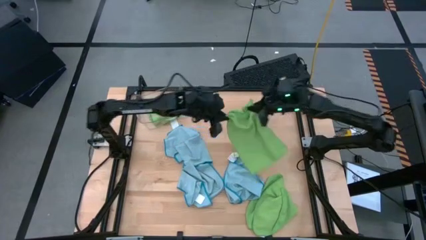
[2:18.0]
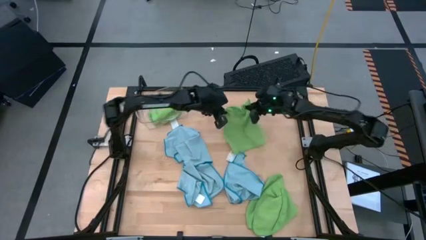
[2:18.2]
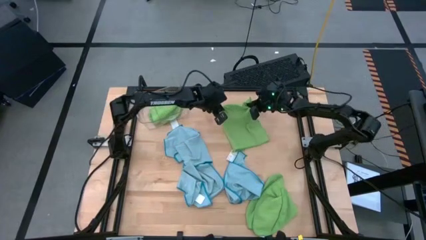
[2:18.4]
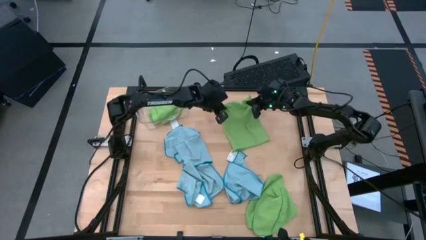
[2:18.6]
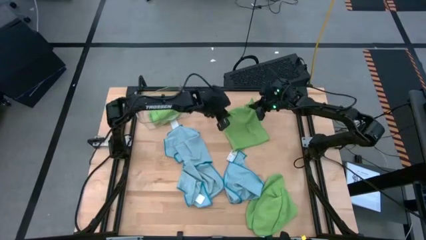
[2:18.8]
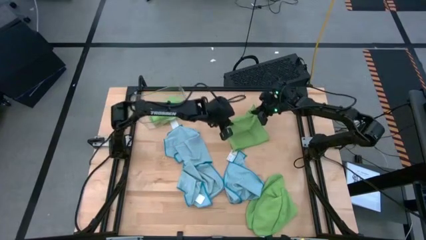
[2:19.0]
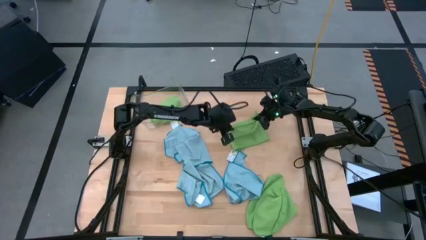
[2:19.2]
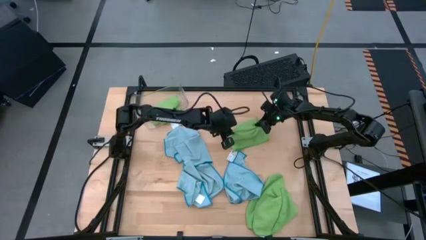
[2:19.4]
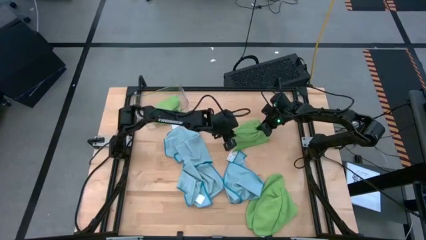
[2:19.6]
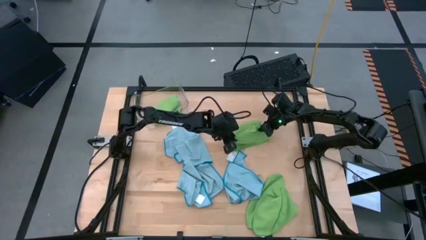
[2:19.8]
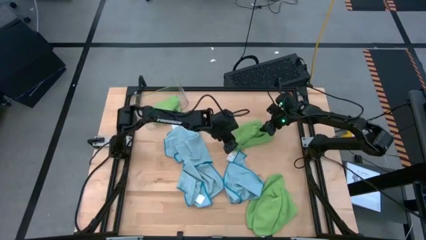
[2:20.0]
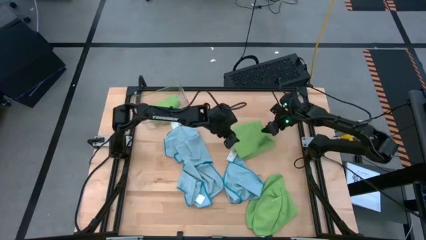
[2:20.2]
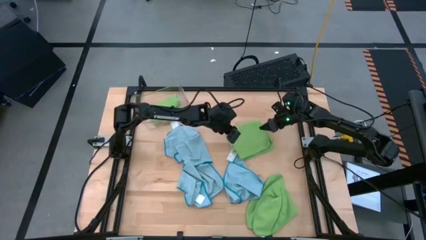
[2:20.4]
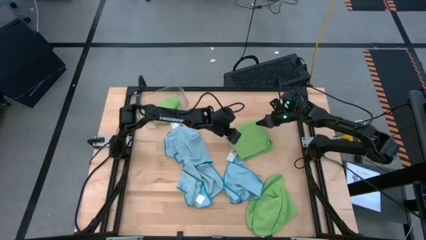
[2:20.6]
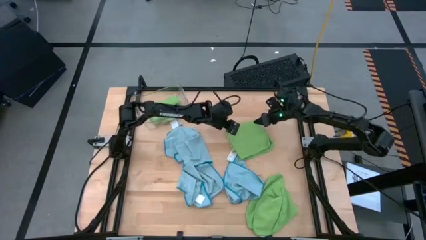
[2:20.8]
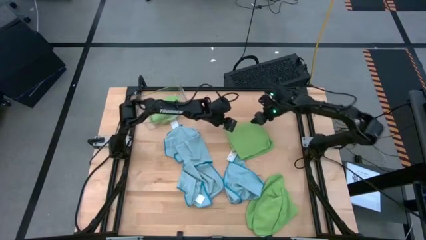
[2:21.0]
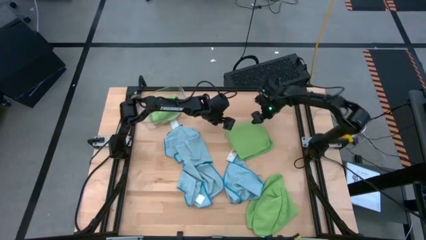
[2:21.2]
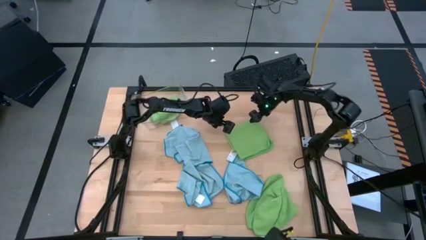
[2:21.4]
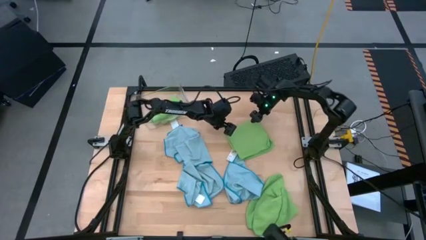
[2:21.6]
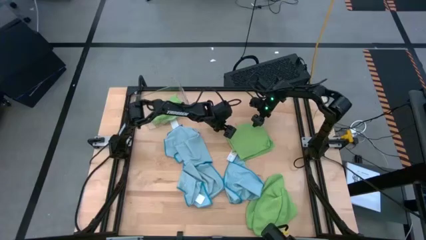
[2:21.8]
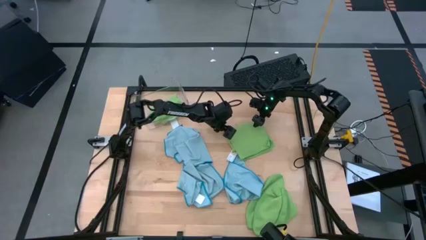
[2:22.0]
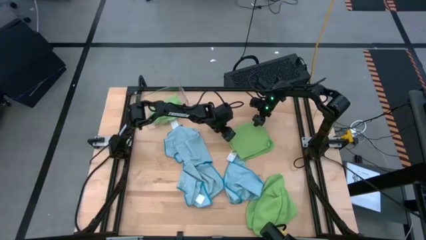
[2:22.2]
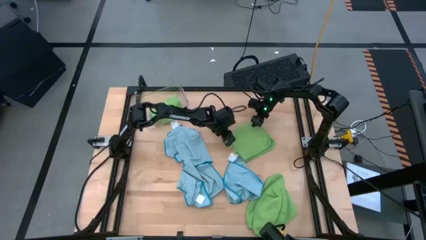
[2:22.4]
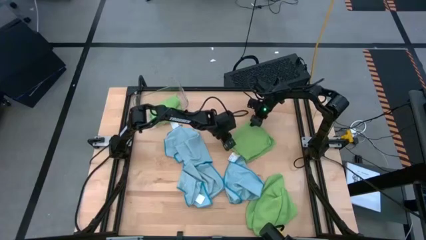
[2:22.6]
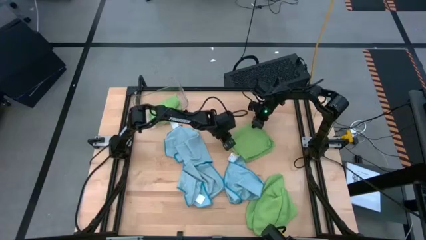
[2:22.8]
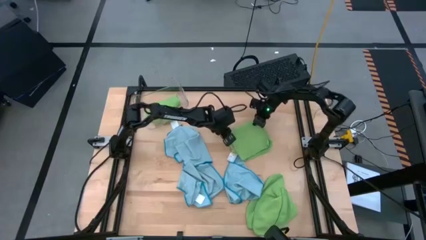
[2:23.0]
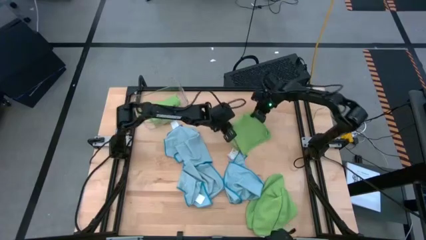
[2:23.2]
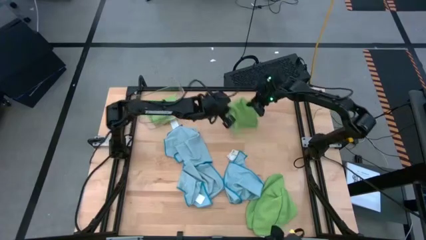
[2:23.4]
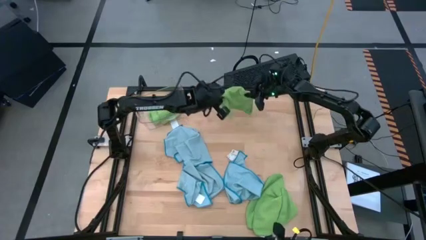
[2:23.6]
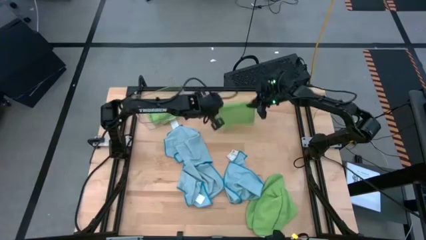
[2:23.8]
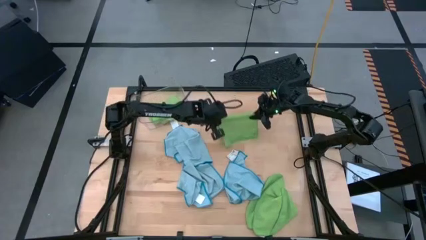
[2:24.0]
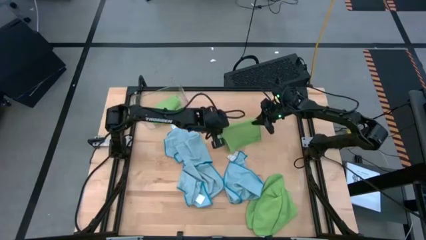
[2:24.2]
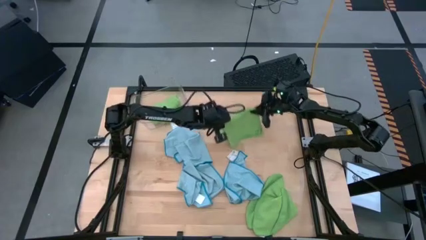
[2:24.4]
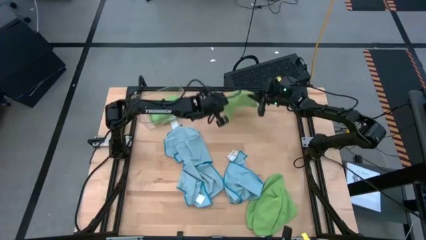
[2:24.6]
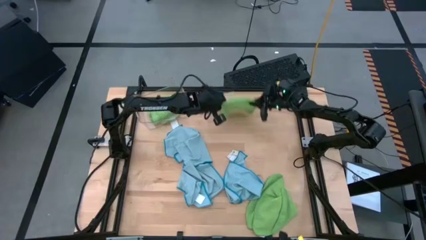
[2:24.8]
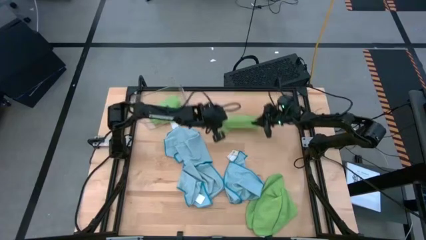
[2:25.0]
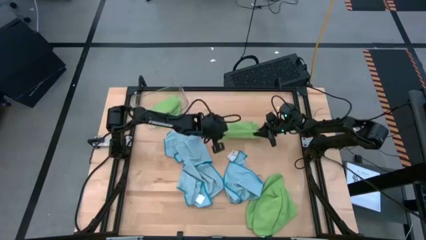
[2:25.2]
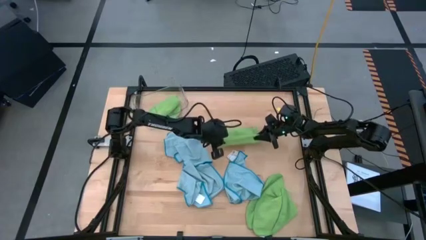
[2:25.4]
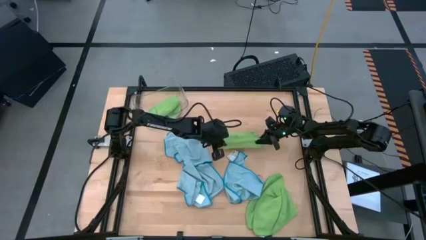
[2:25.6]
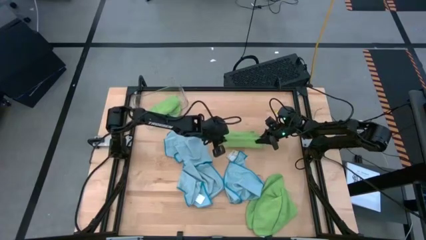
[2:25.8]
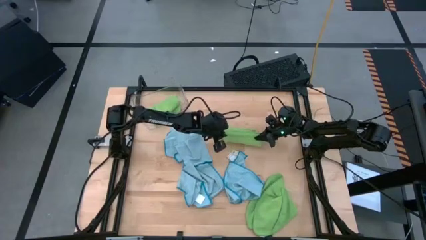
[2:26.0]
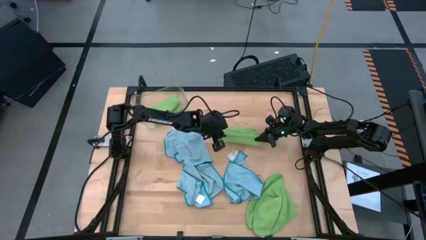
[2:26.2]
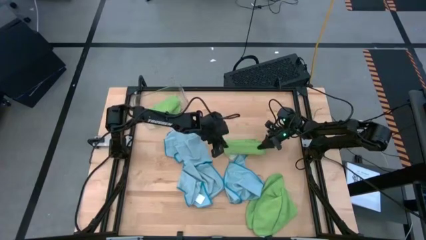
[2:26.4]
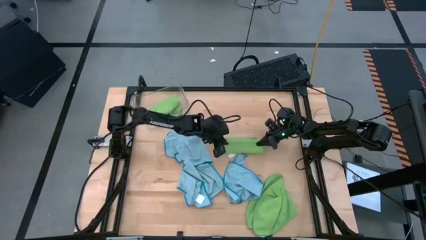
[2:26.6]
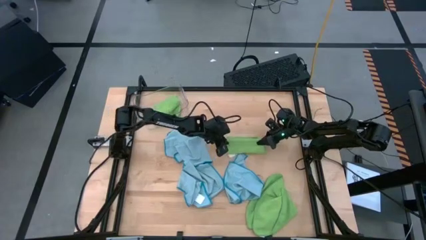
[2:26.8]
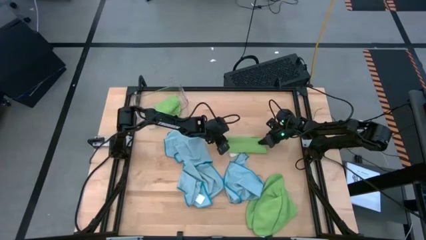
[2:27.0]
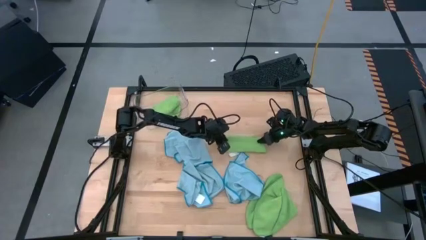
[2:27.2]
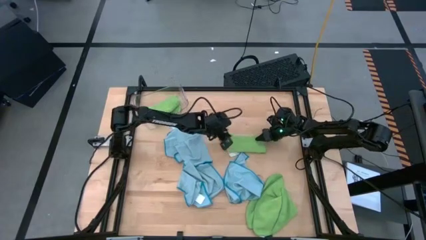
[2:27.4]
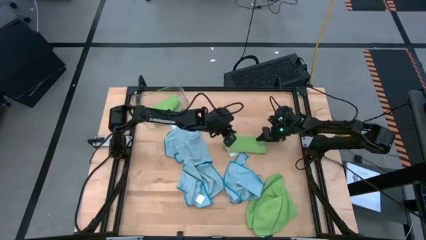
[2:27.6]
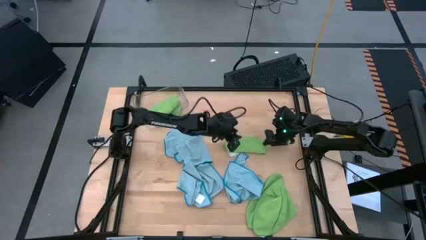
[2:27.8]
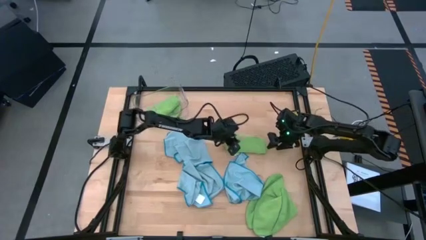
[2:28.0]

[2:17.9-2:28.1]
Task: Fold microfiber towels
Fold the left green microfiber cloth

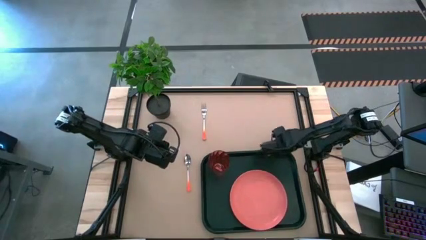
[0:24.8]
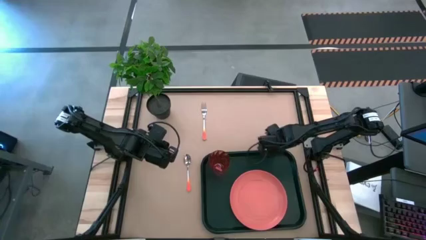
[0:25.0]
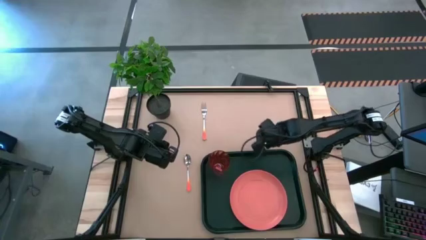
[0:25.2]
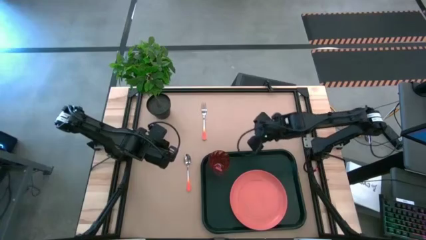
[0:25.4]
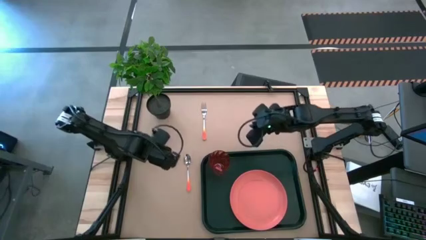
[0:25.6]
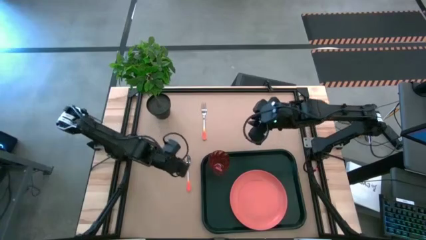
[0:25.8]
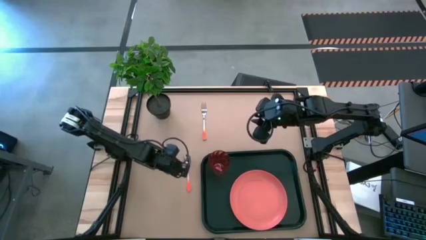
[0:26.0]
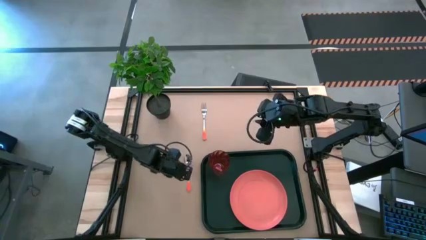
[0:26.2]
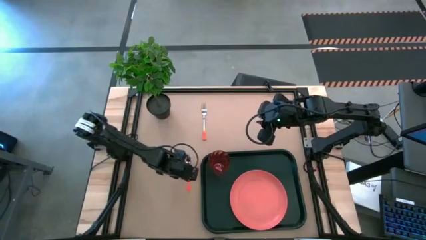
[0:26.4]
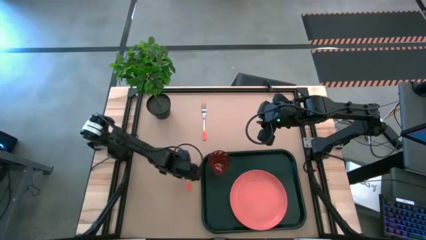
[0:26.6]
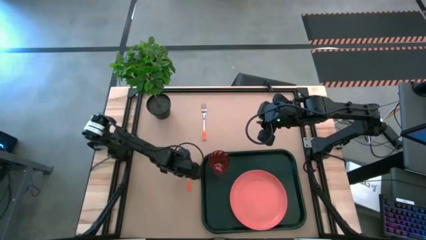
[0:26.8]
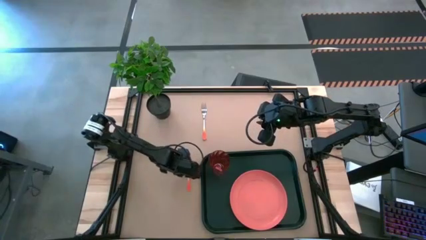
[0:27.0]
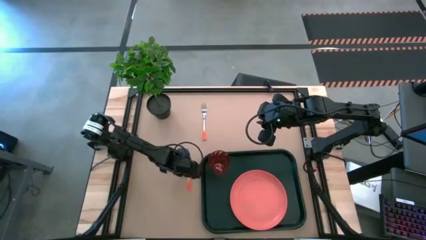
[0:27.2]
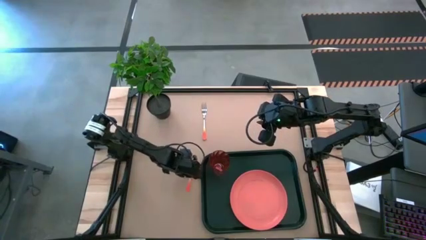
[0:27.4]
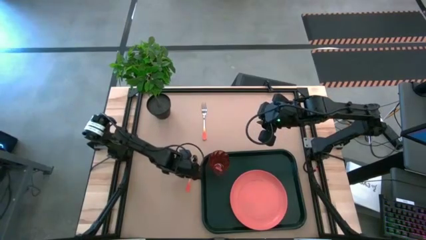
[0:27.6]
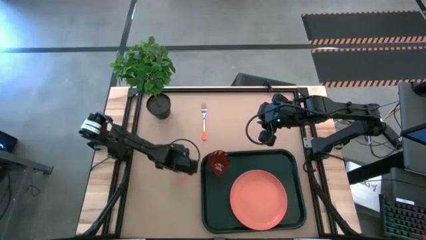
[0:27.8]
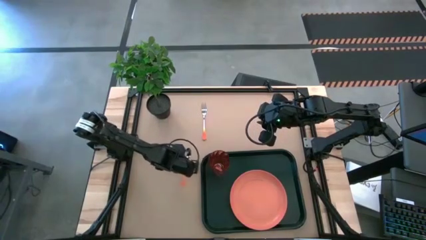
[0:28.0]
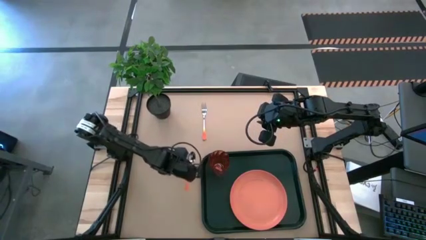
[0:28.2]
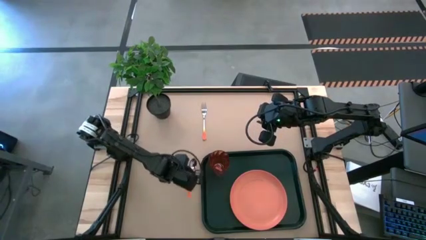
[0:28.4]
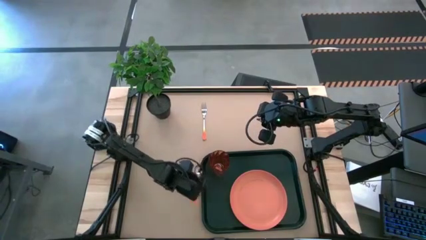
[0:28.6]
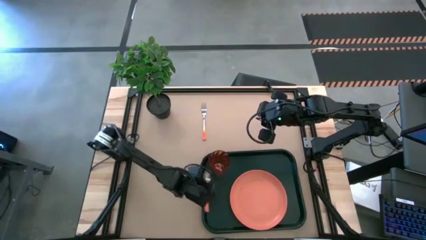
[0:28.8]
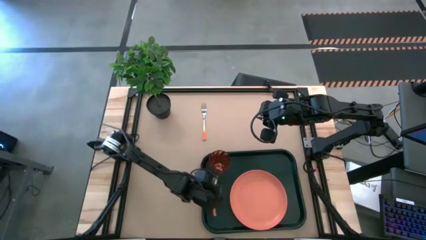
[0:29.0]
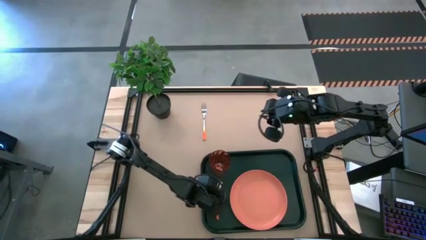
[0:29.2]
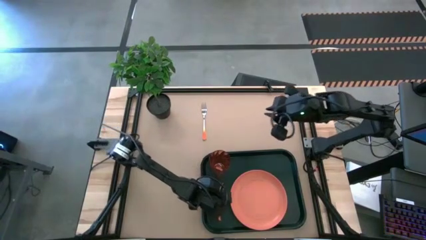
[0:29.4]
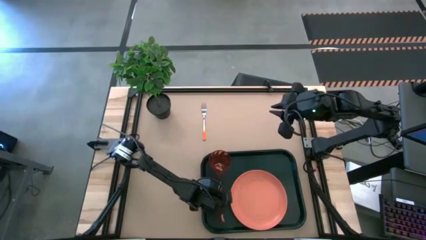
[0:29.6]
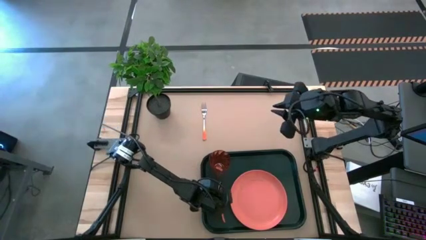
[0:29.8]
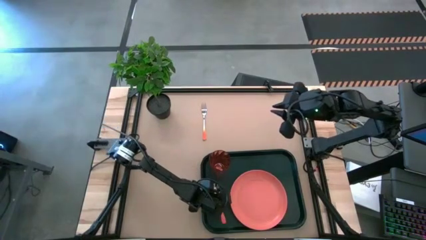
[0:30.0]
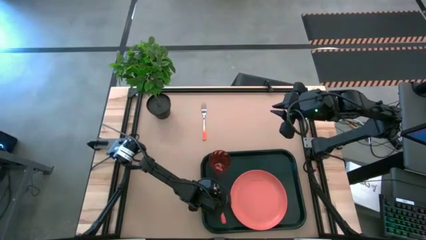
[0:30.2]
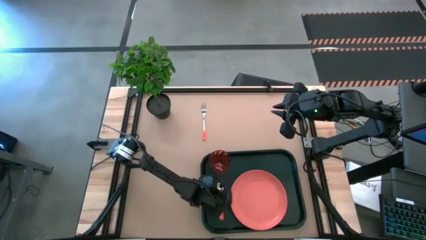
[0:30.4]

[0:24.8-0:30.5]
Task: Pick and place plate/cup/fork/spoon on tray
Put the orange spoon on the black tray to left of the pink plate
